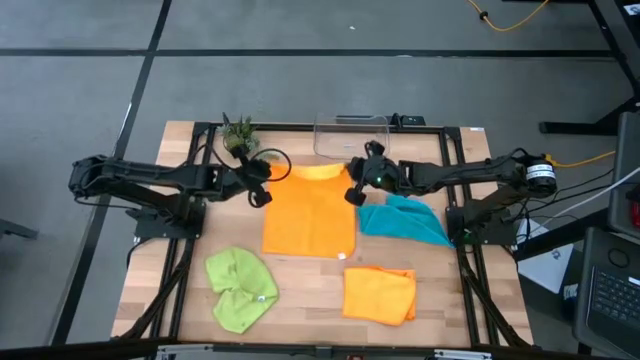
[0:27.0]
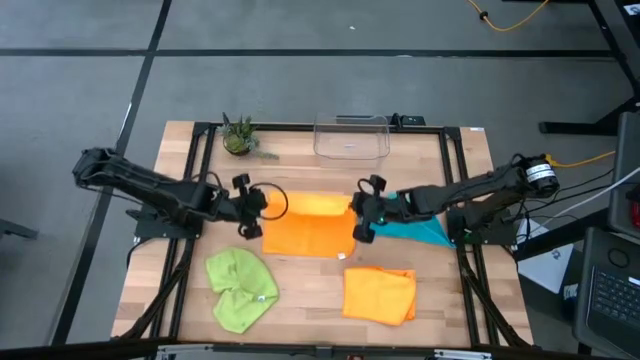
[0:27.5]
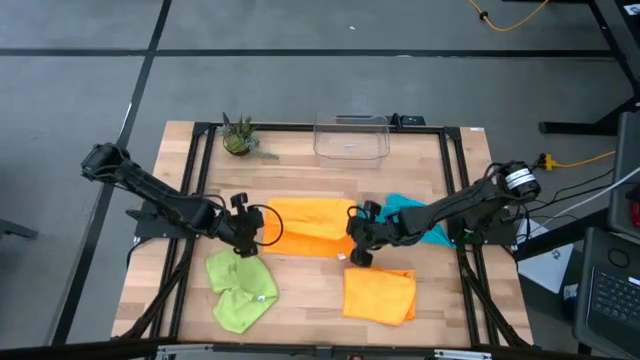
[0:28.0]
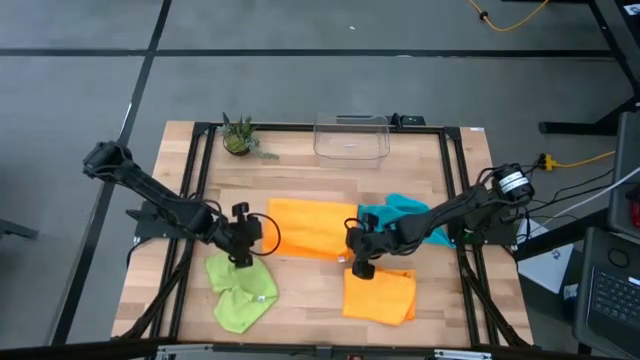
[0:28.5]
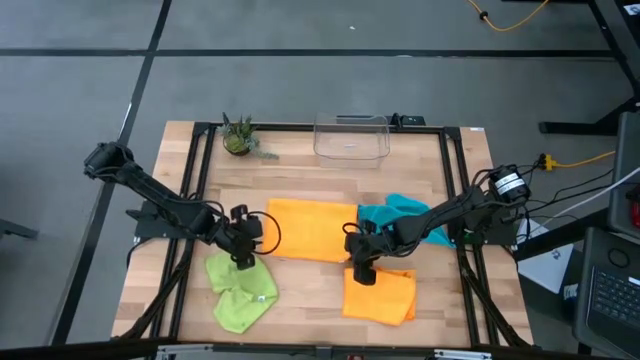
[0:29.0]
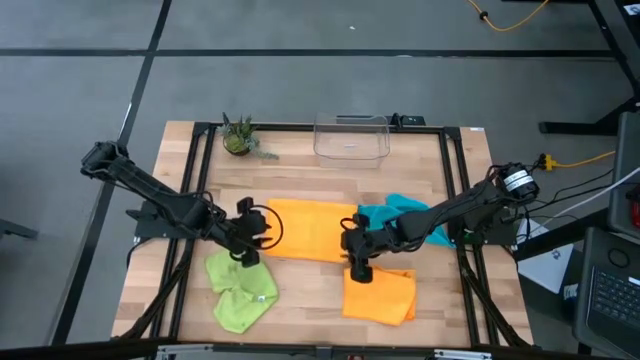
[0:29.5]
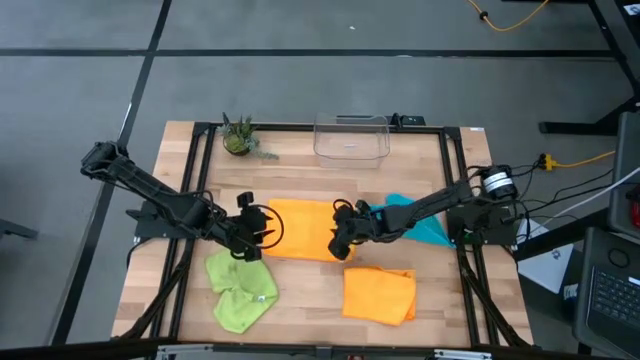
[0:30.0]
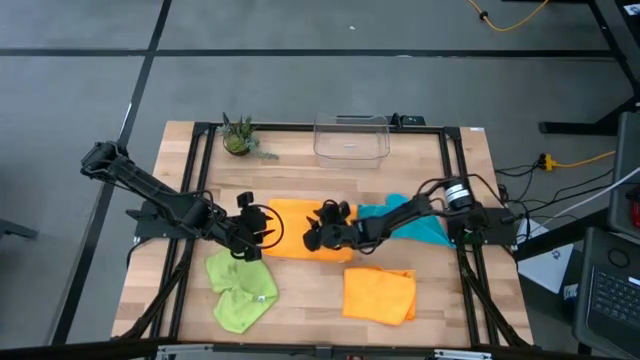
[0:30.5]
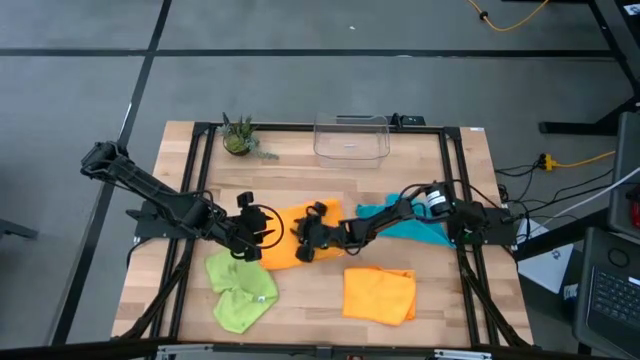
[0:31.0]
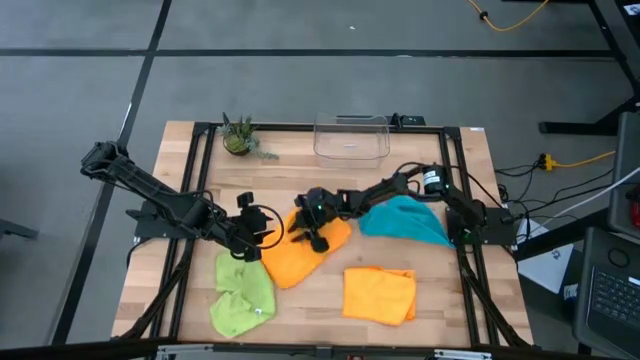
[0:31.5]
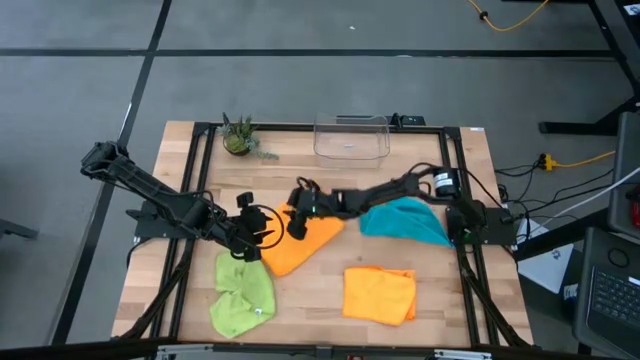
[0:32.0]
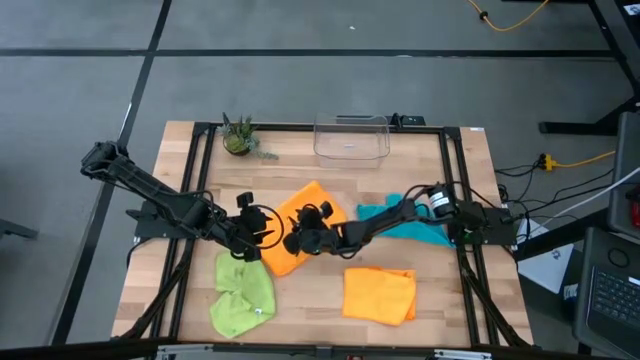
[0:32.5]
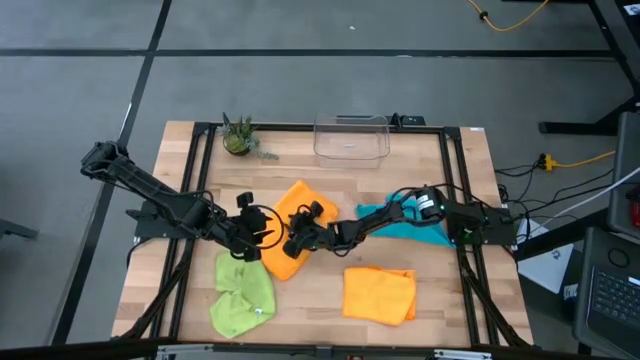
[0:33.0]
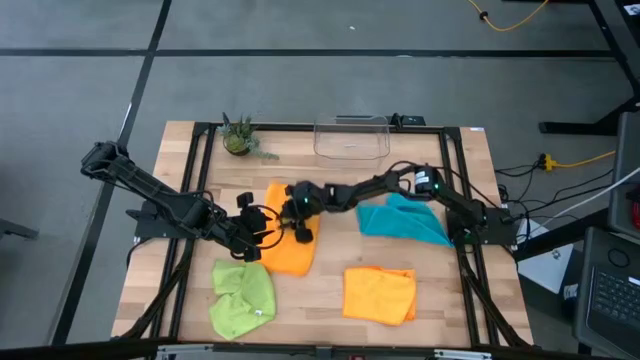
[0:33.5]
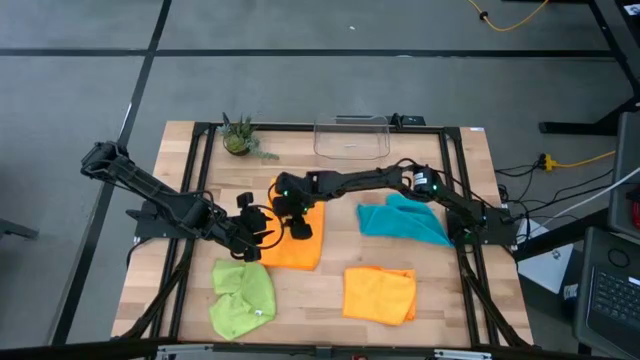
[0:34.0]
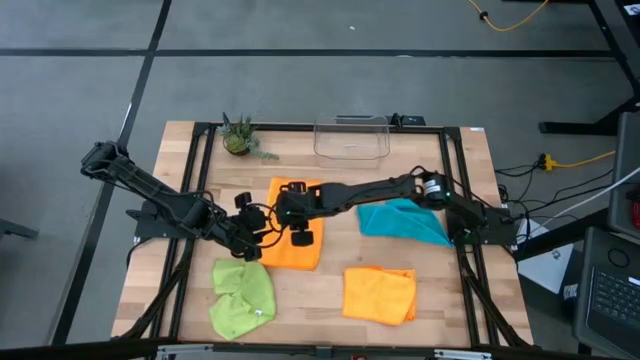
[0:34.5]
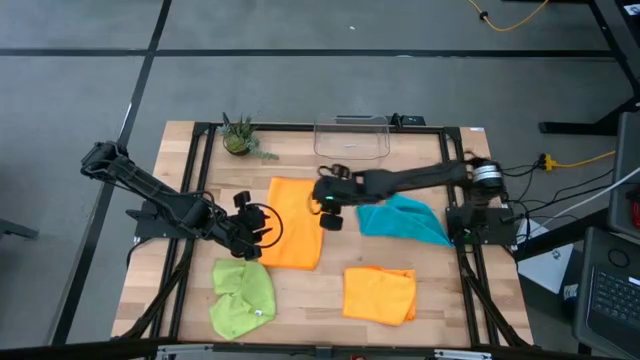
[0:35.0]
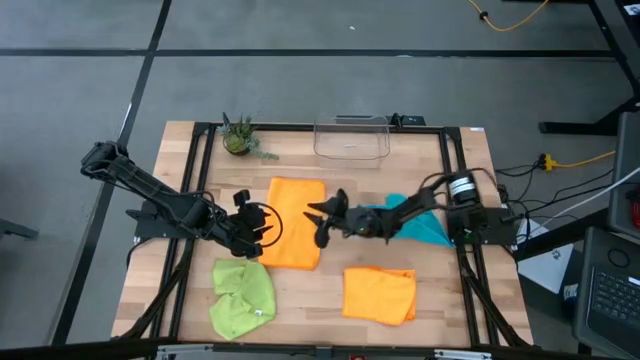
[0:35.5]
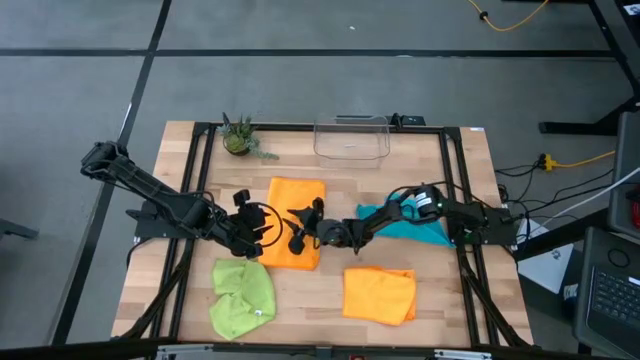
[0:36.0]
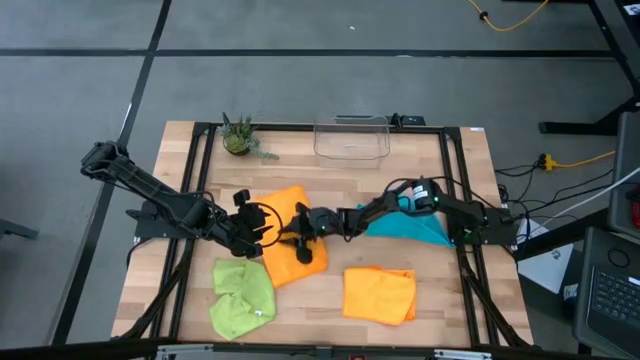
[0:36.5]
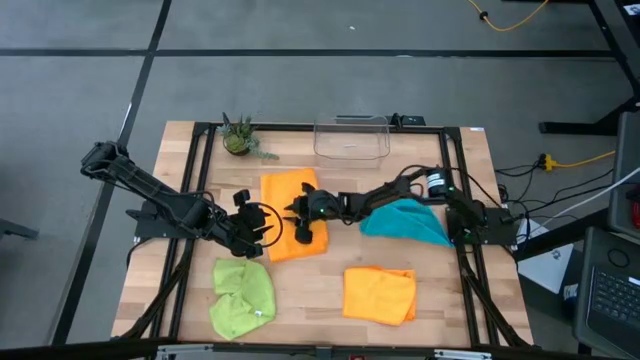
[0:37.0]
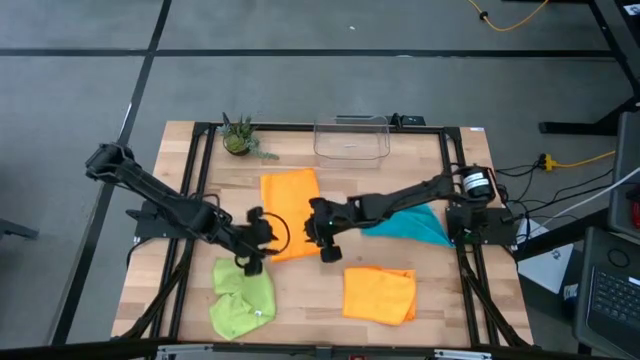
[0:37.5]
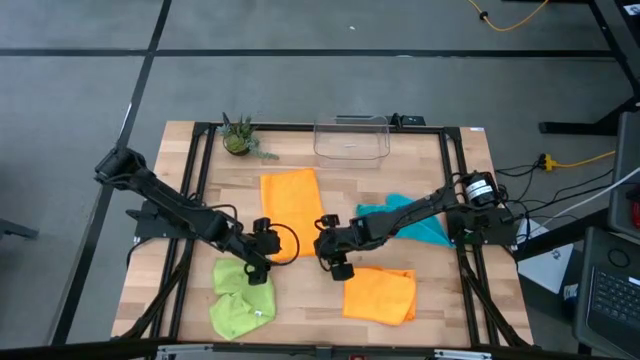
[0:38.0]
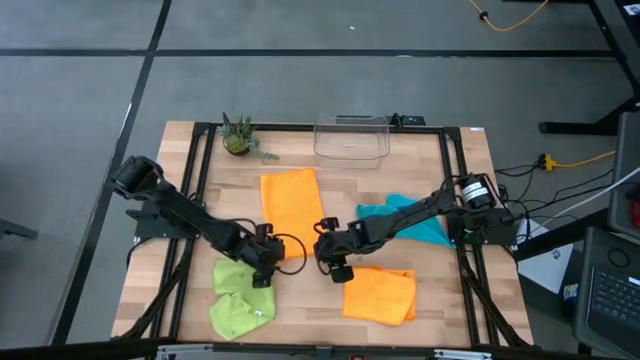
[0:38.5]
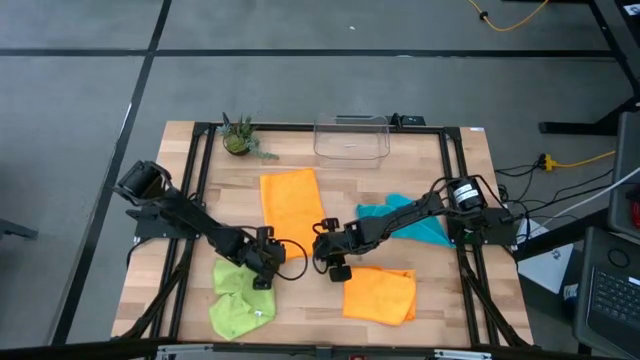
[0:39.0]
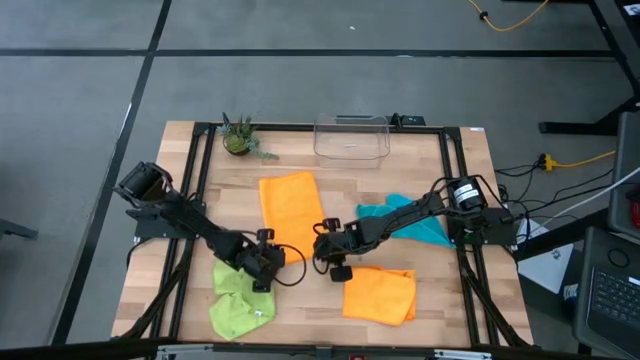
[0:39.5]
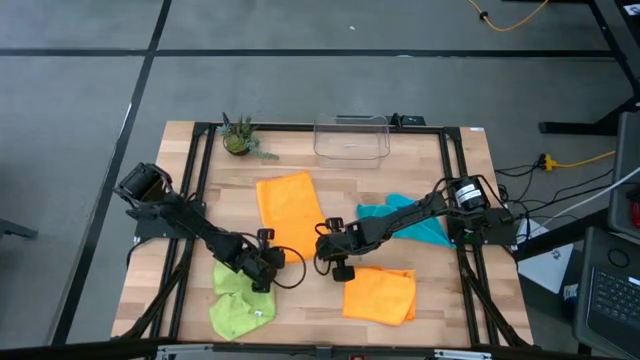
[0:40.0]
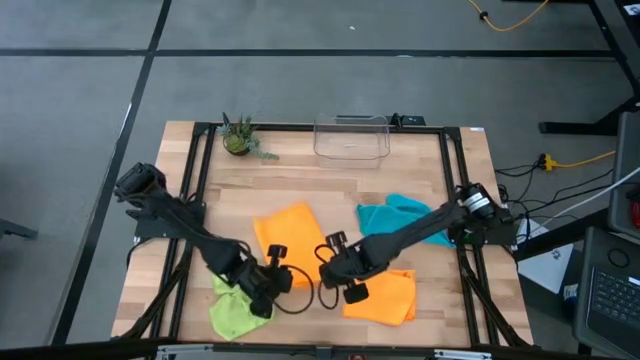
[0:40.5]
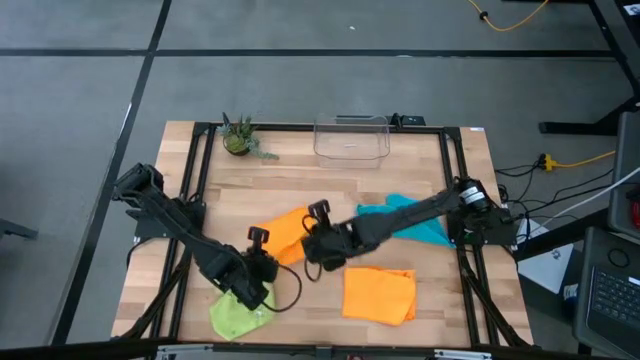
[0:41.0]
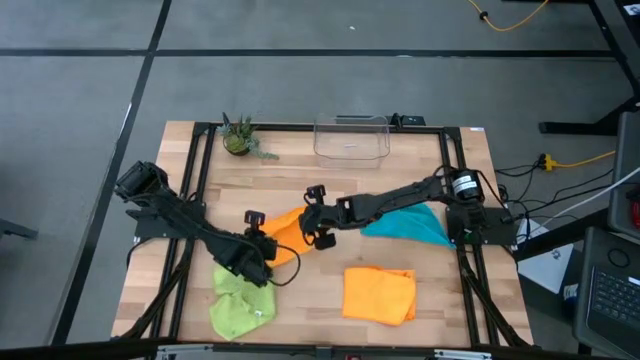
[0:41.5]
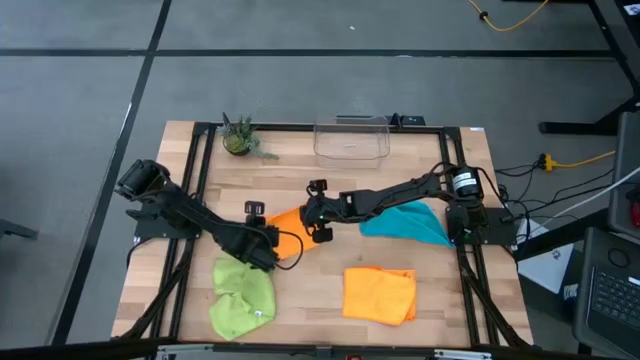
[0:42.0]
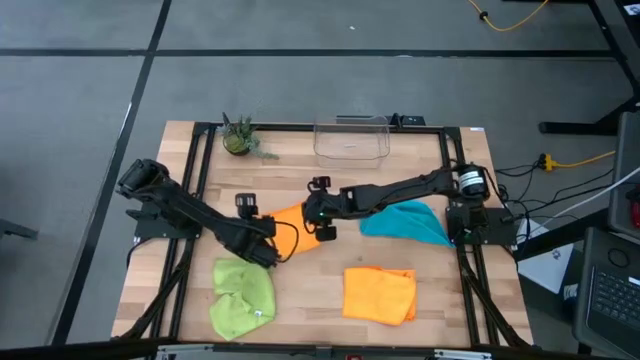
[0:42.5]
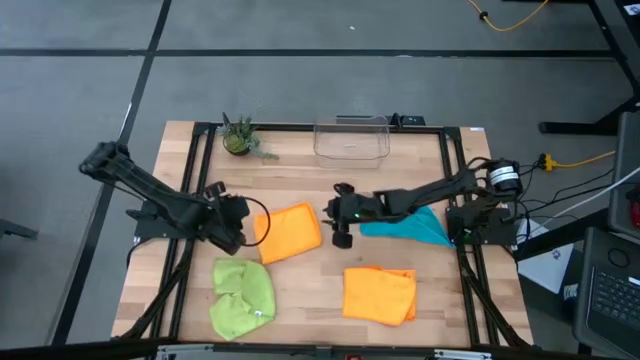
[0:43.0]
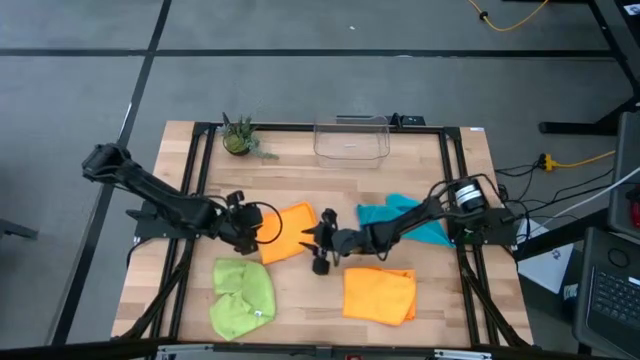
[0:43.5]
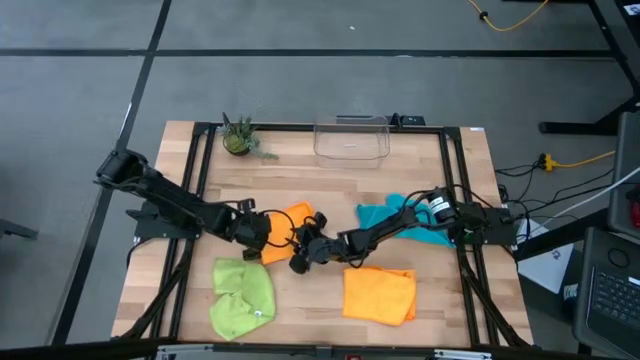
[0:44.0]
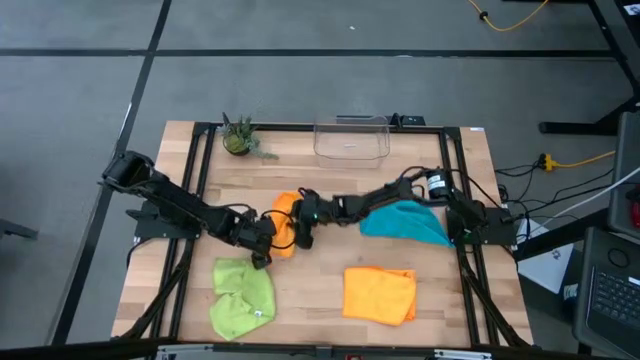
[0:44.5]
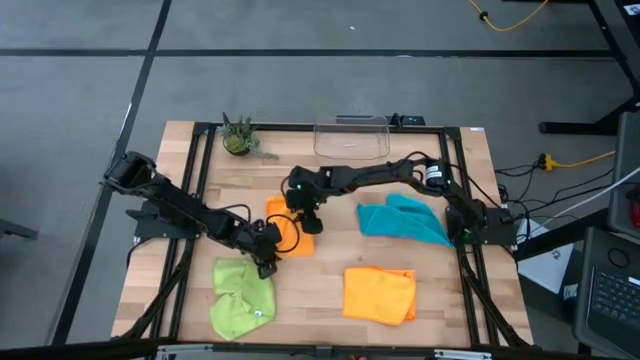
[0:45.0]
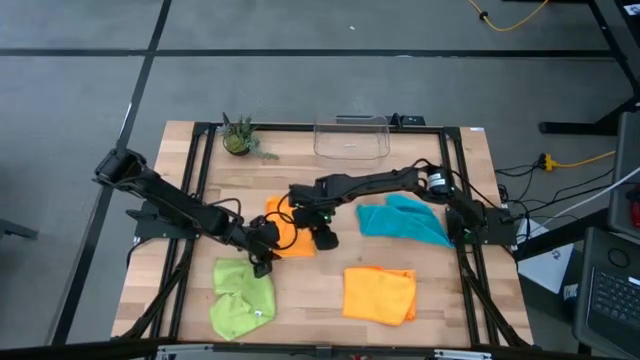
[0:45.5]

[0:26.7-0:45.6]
Task: Fold microfiber towels
Fold the top orange towel on the table

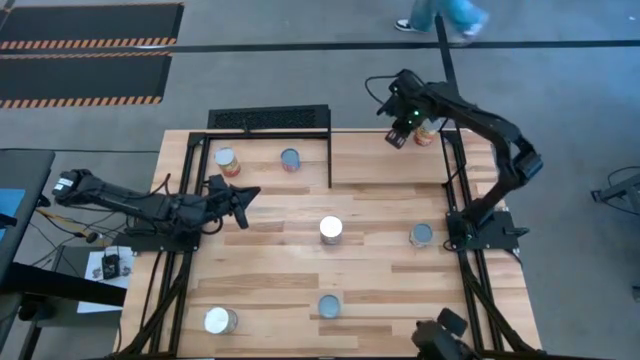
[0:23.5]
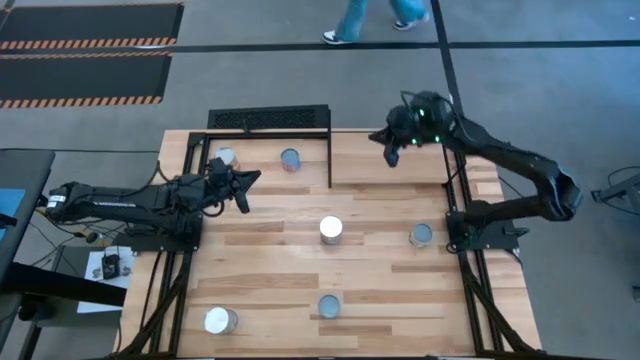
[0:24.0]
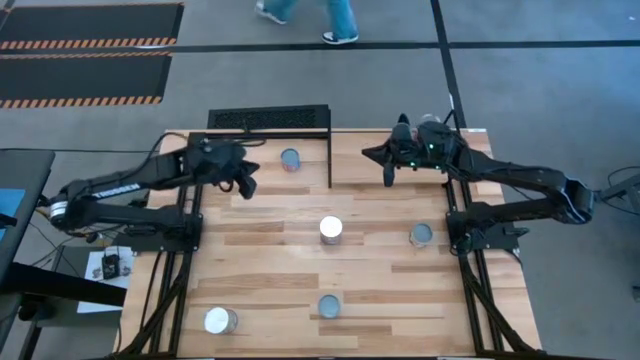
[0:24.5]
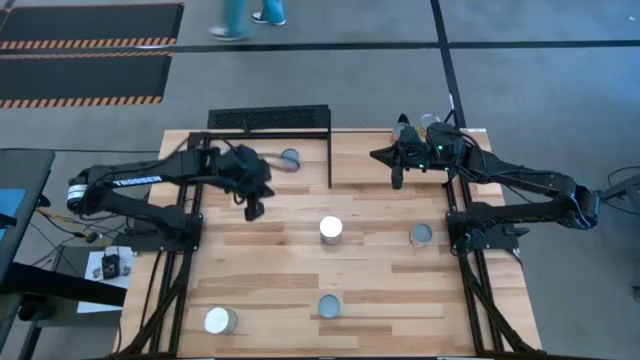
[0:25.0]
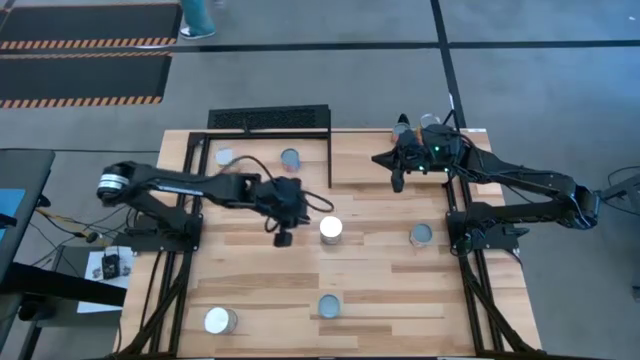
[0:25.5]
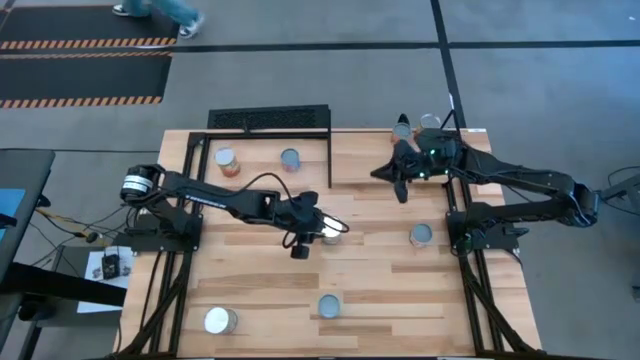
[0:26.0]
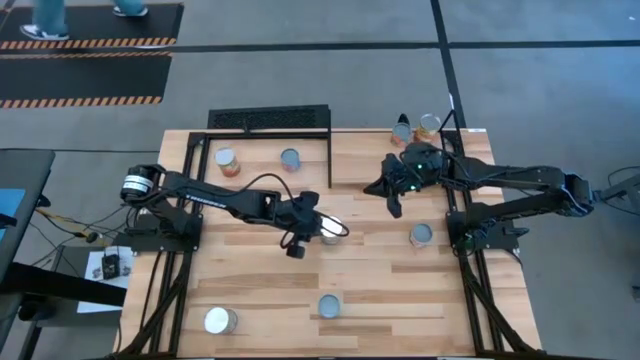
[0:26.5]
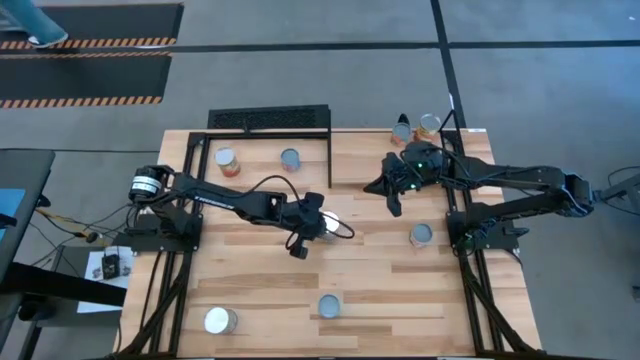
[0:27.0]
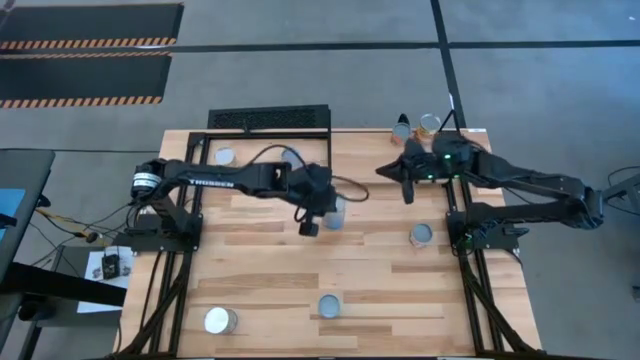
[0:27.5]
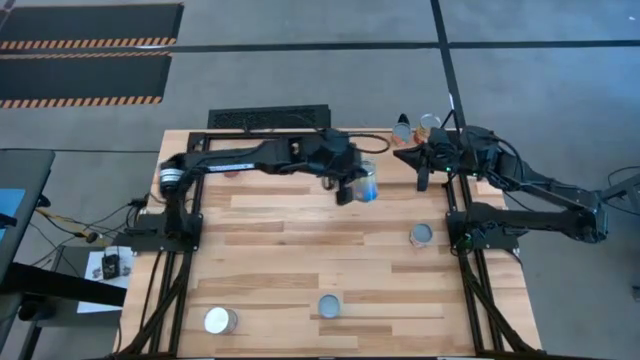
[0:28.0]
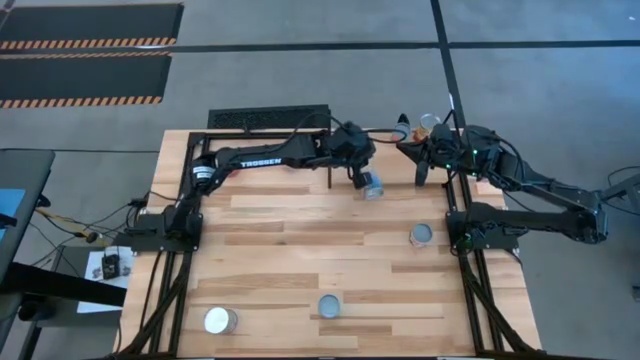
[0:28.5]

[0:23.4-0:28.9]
Task: Pick and place cans onto a shelf
Put the top canned peaches on the shelf
